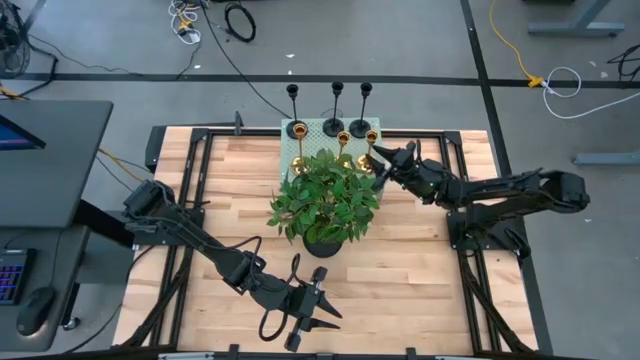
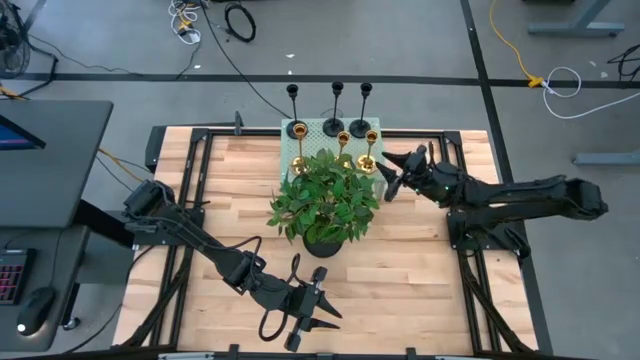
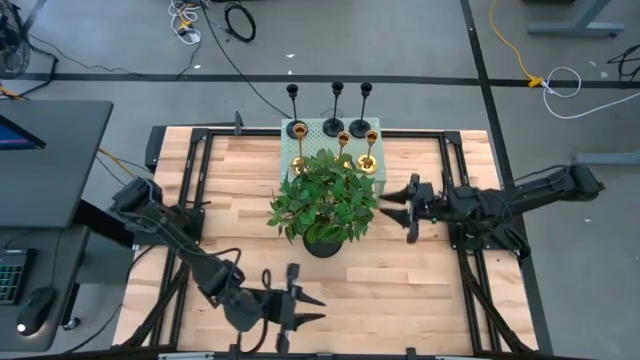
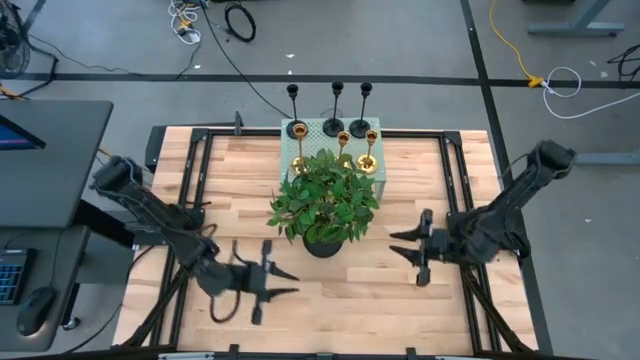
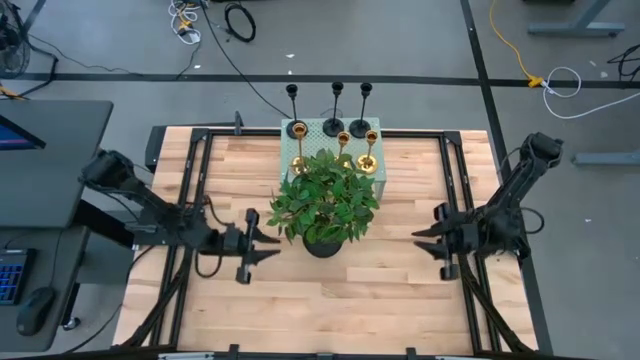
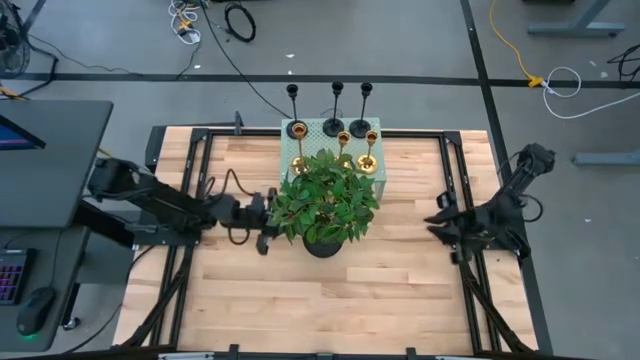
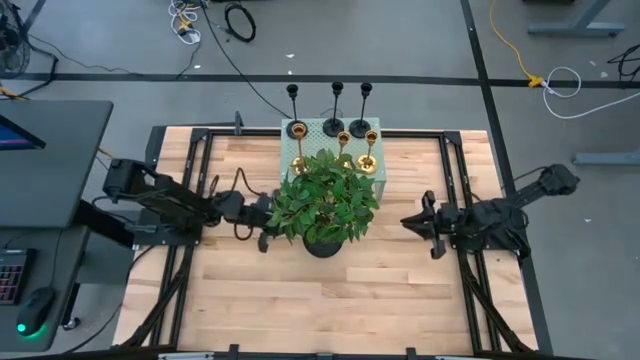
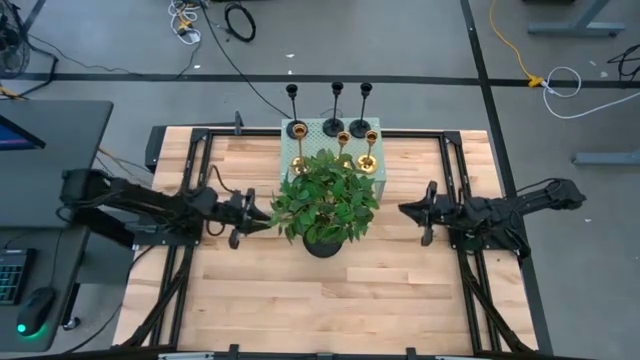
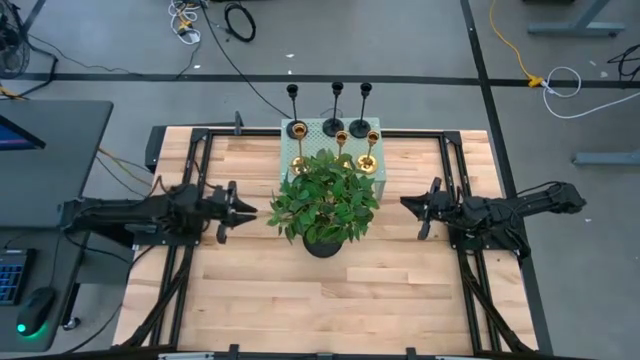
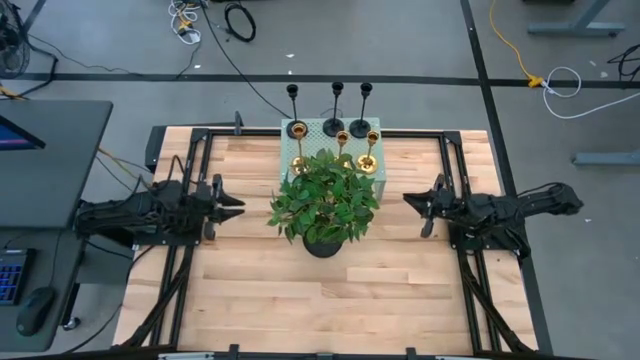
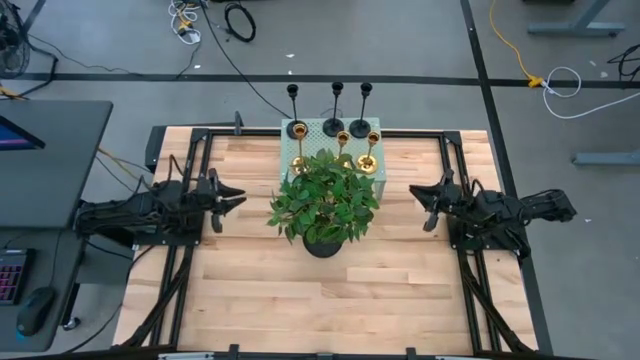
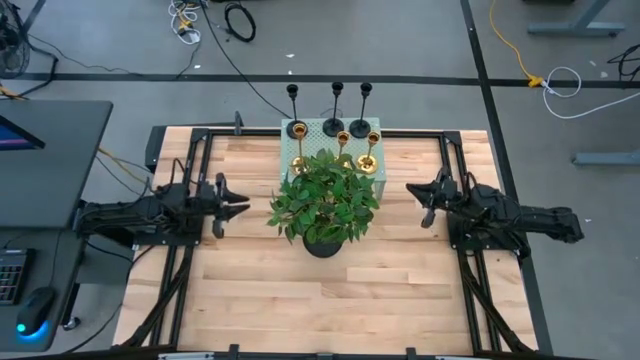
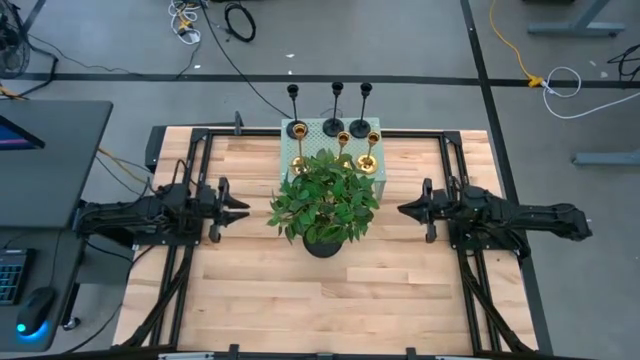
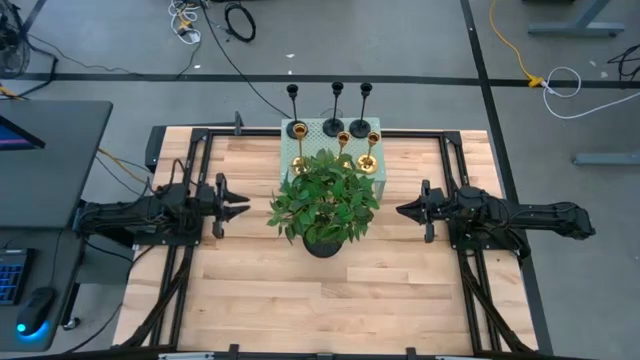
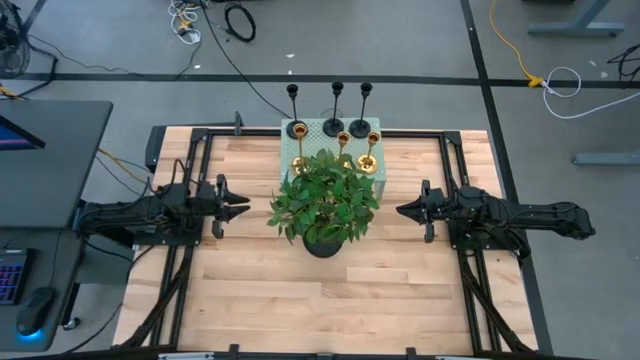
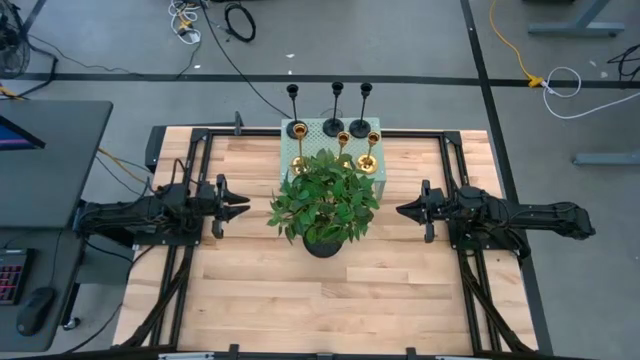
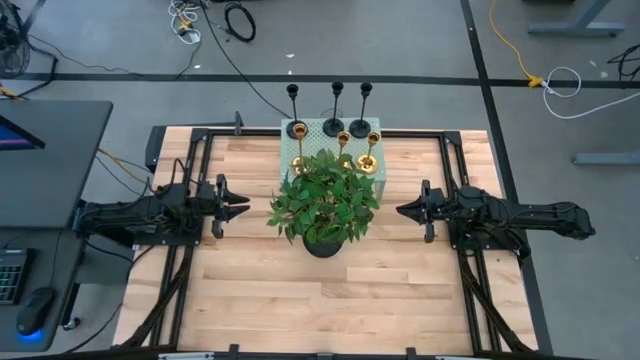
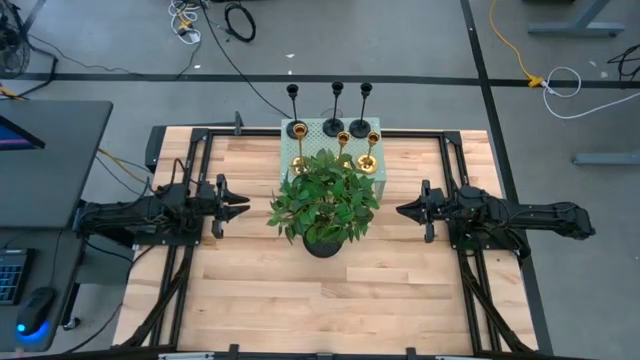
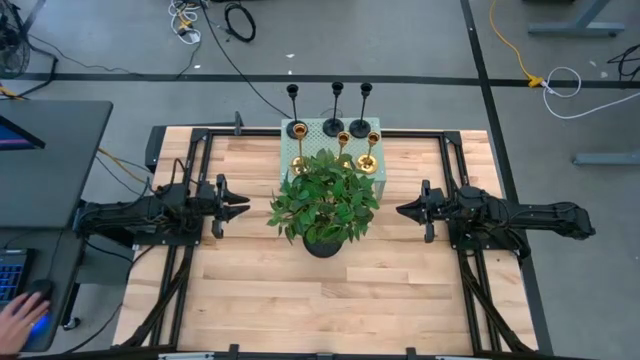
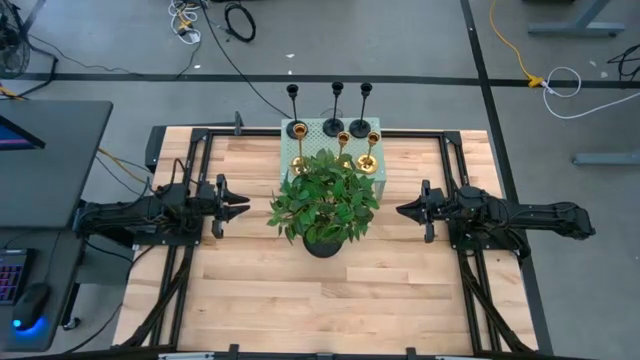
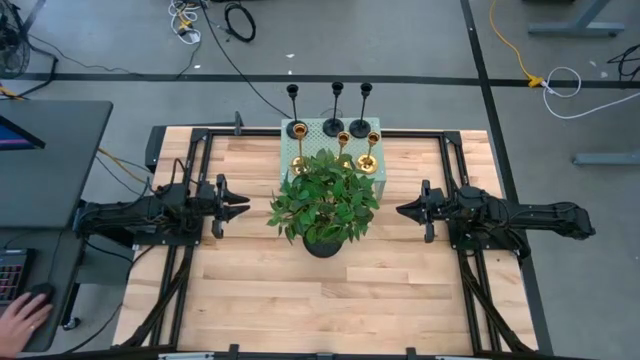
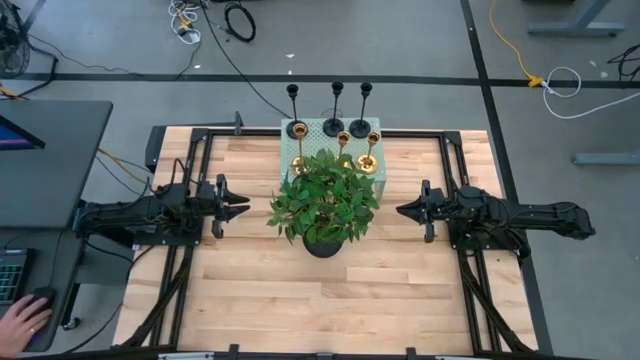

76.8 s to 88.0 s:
Task: Pick & Place candle stick holders
Return to Home Position

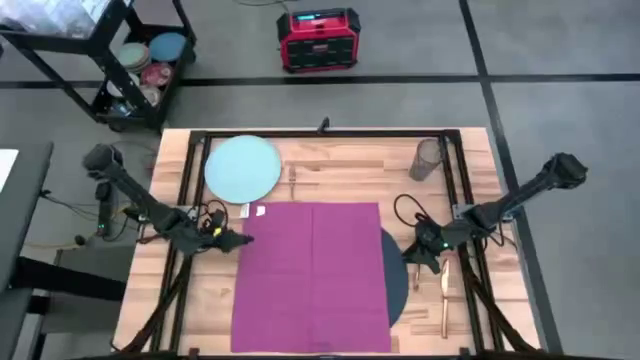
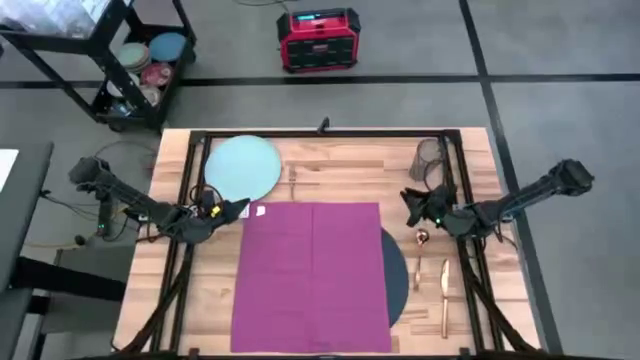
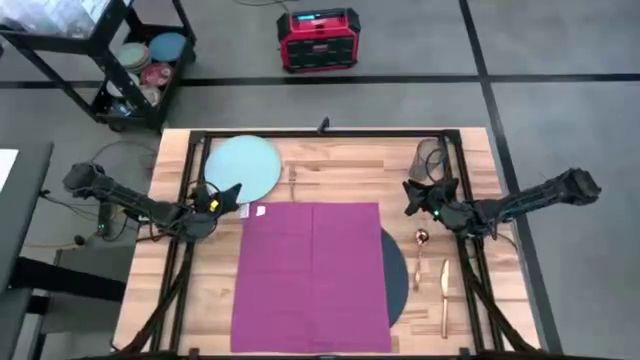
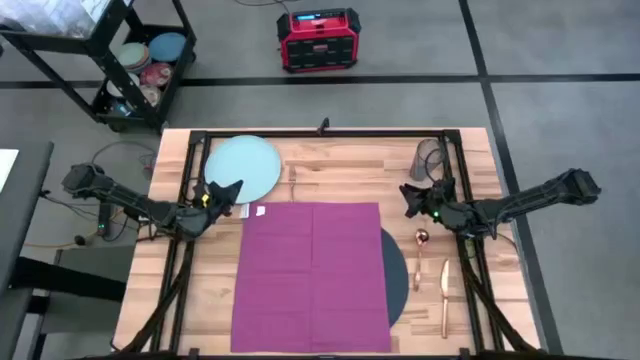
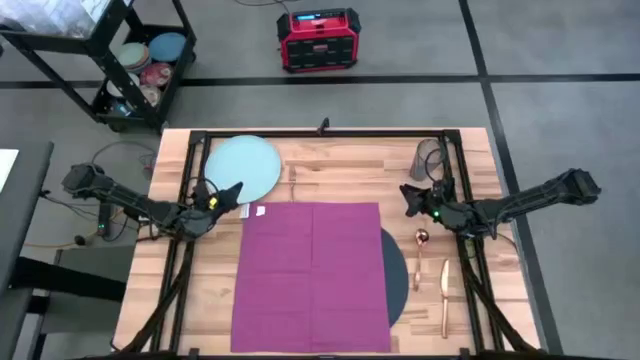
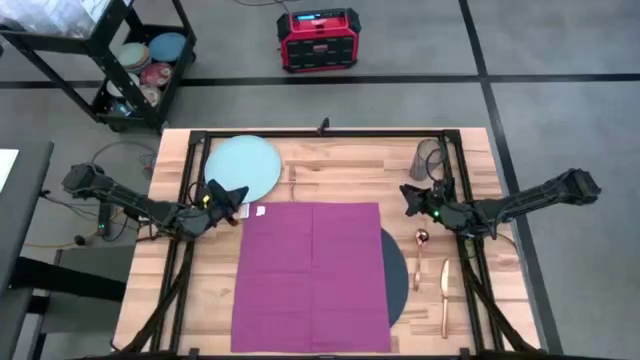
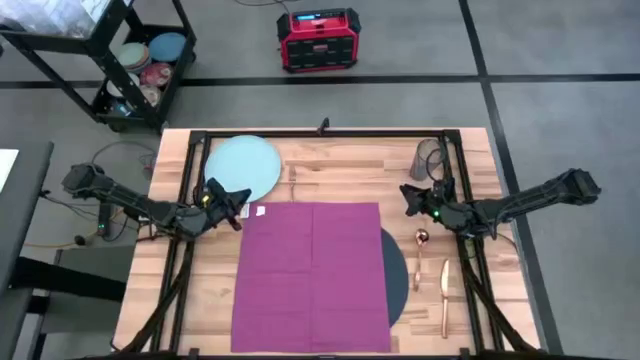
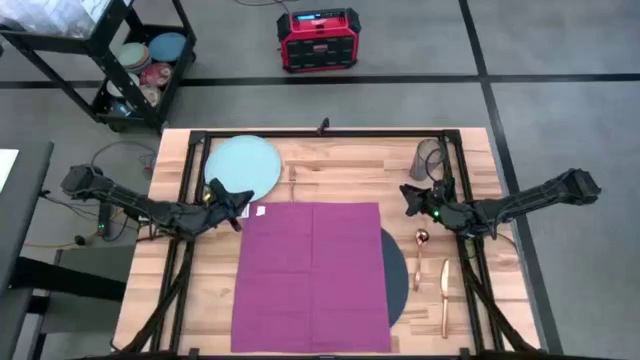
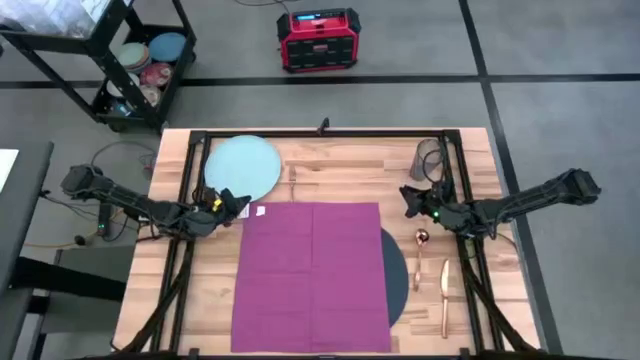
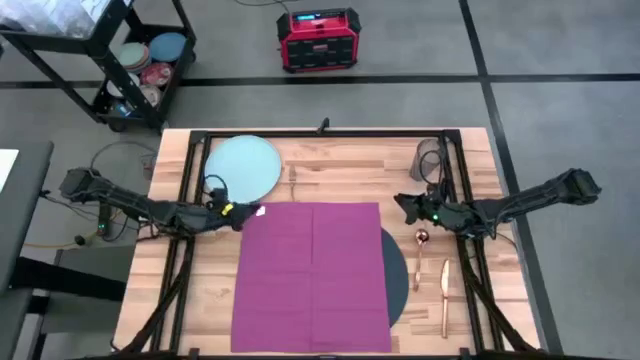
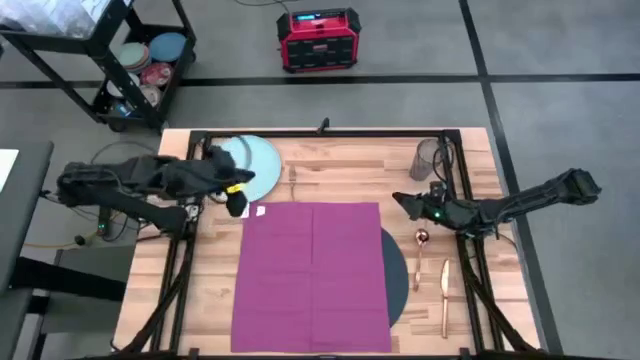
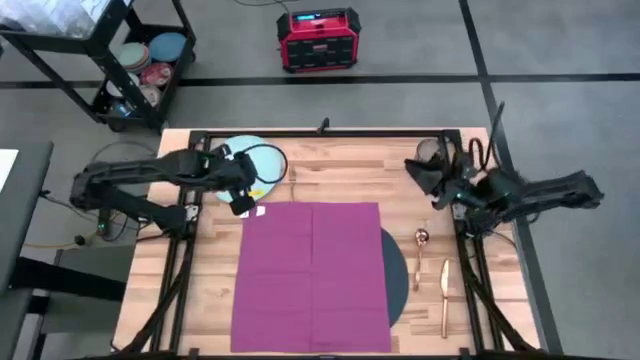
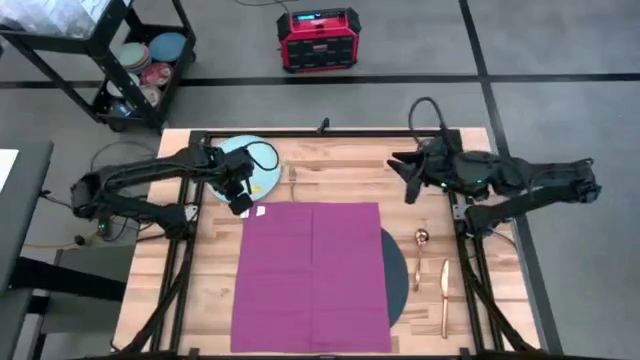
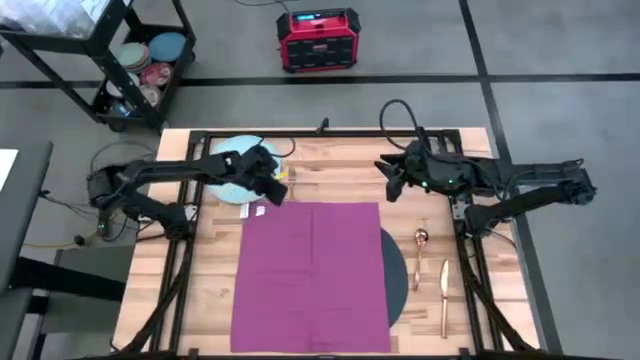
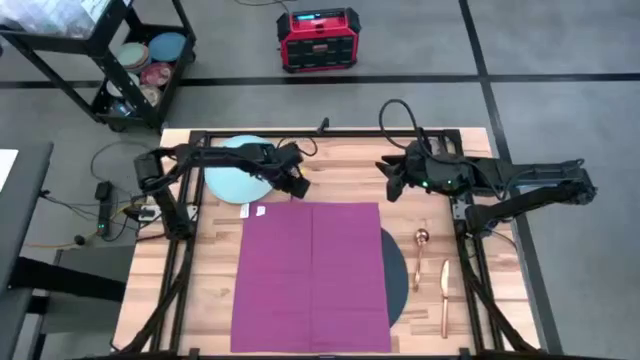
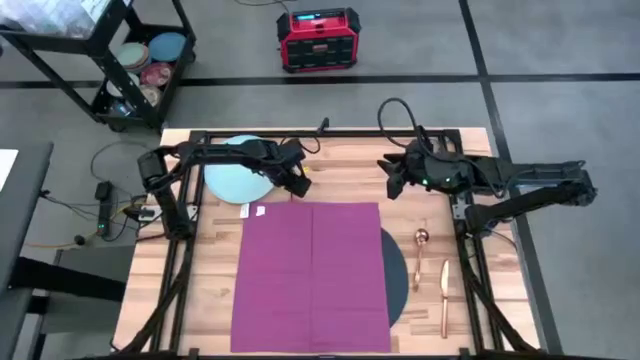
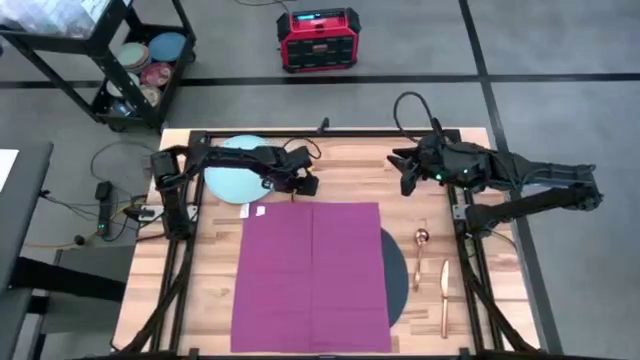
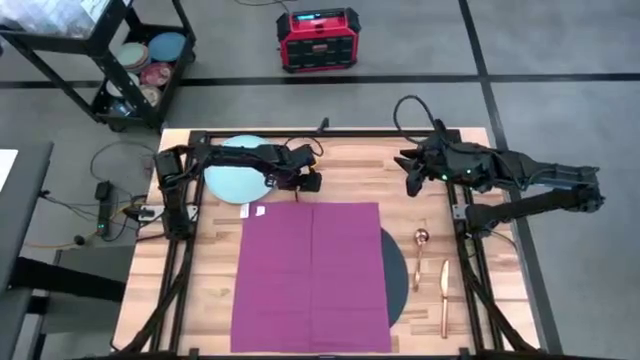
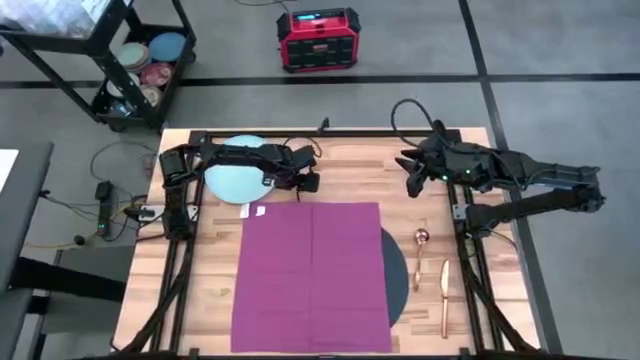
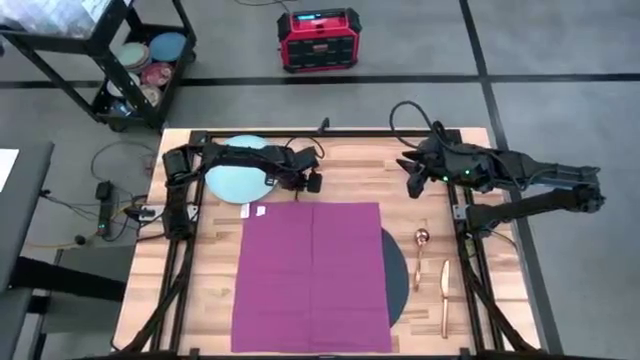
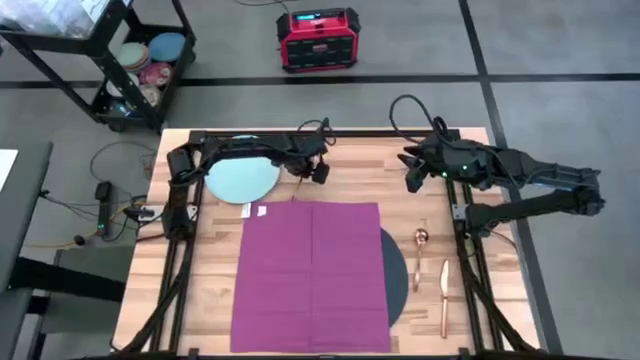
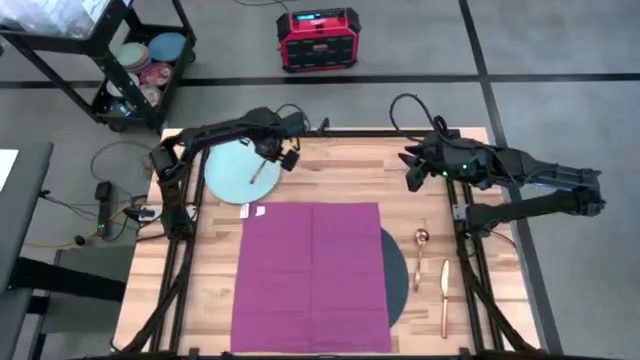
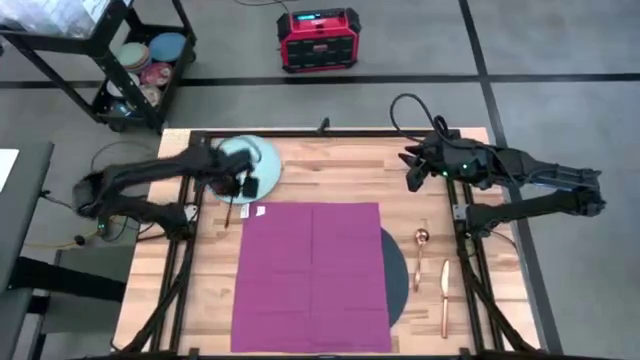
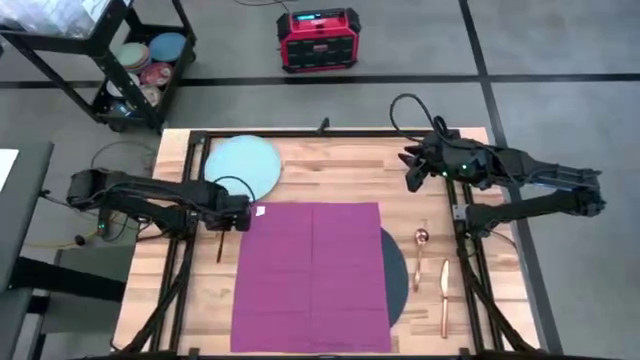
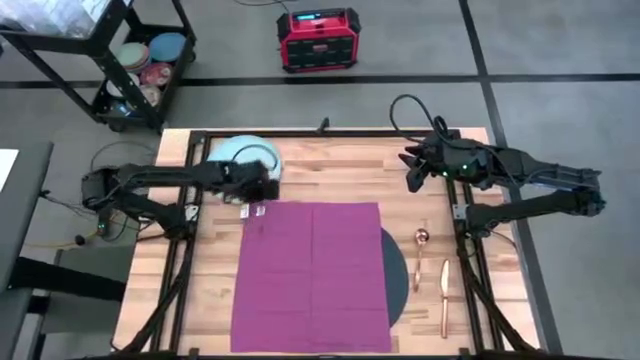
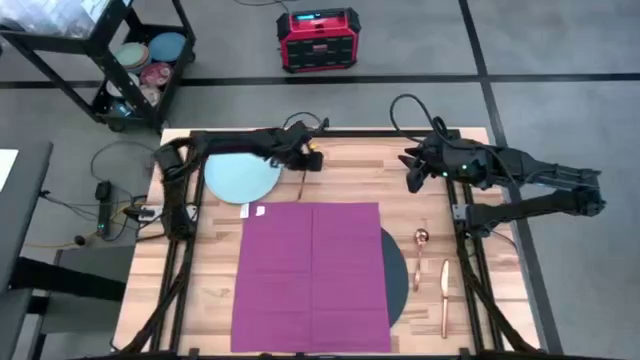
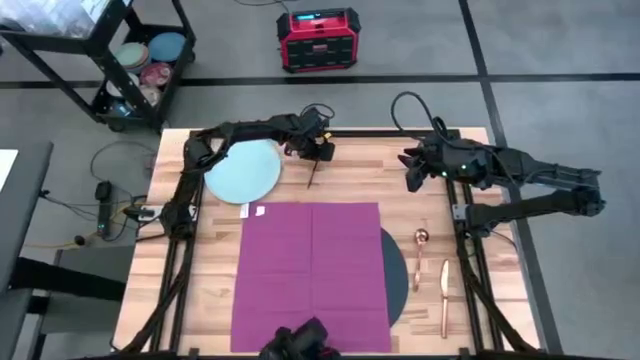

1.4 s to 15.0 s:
Task: Set table place
Move the brown fork to the middle top of the table
